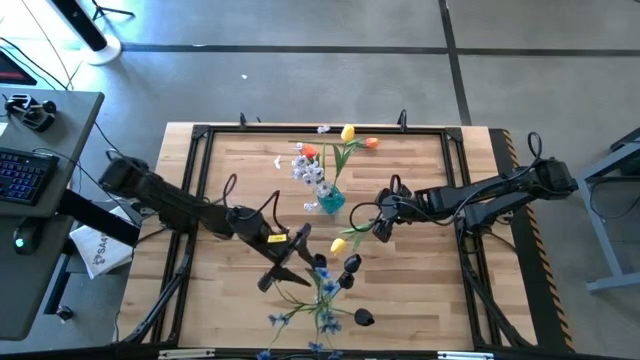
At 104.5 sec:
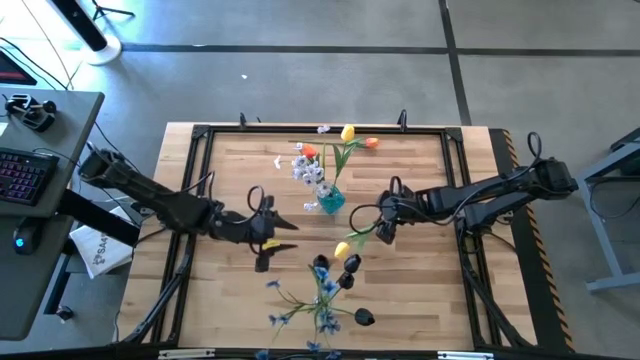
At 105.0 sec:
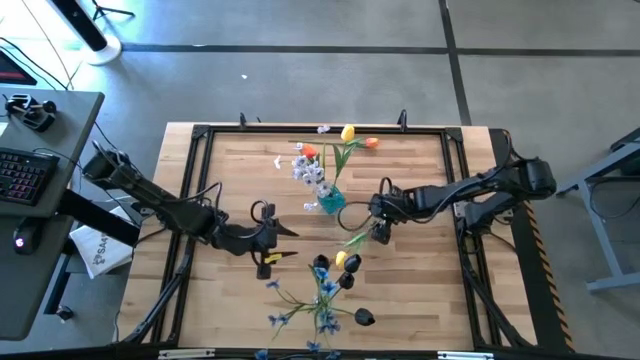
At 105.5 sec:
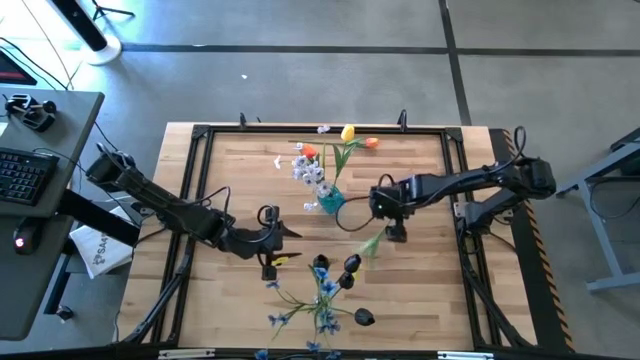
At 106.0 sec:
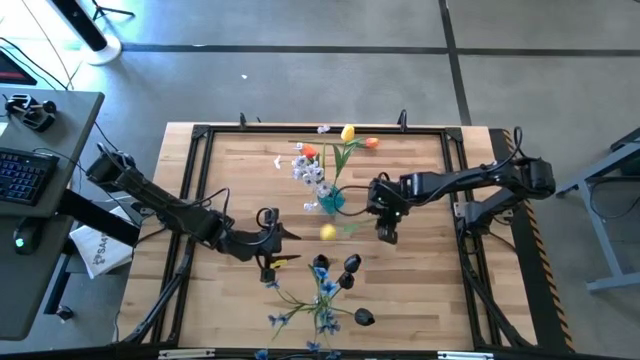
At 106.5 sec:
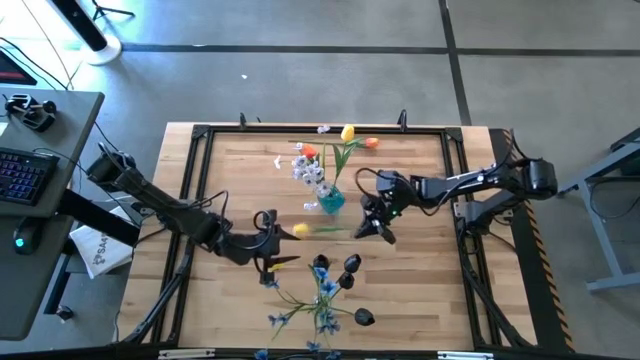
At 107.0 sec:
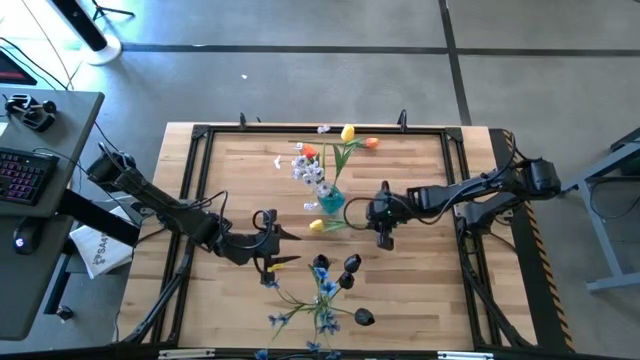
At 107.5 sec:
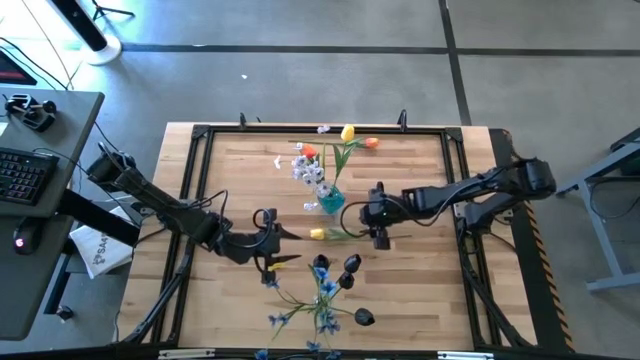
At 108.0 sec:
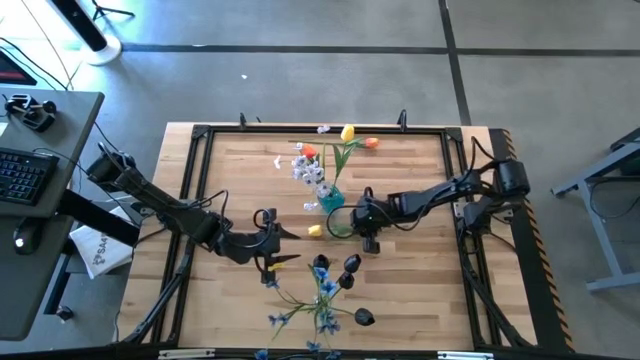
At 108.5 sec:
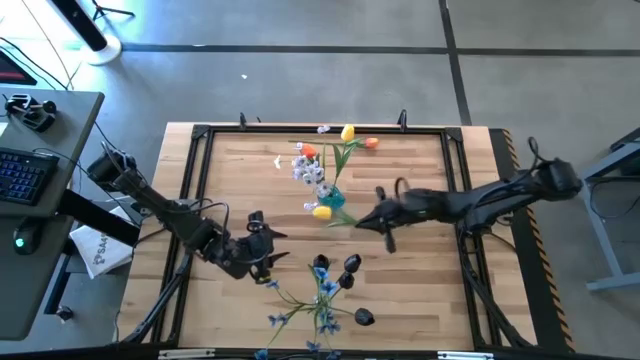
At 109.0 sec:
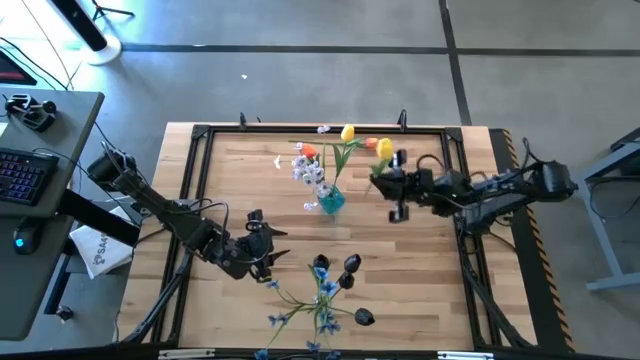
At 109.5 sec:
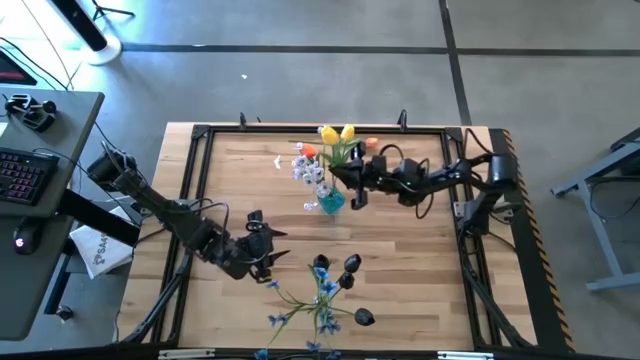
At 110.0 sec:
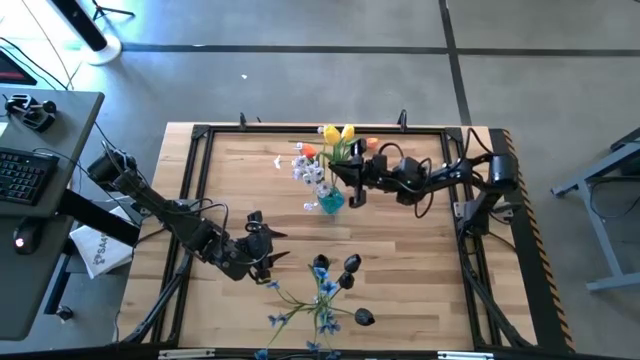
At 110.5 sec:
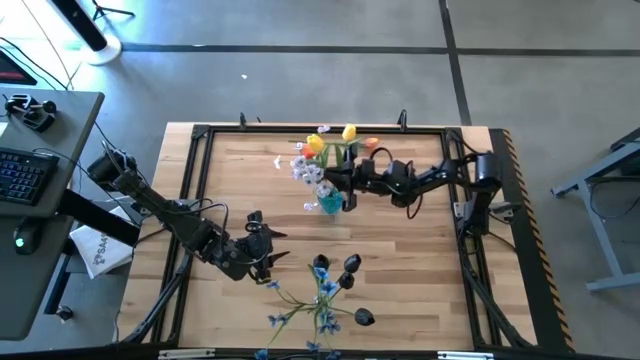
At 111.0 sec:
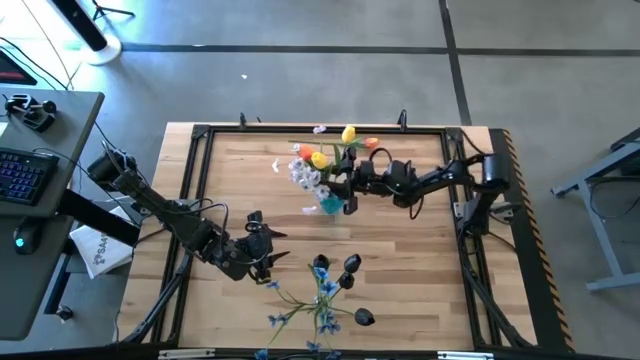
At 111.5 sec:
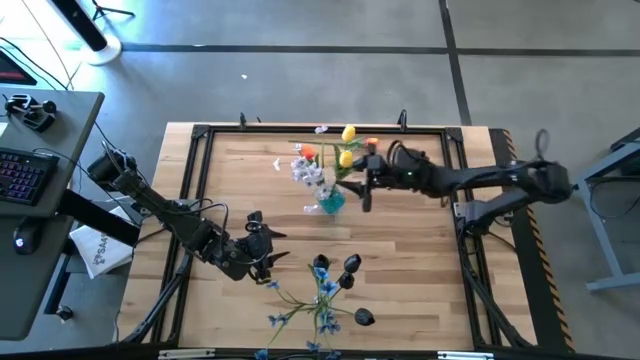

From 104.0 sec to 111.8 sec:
Task: Sort flowers into vase by color
Put the yellow tulip into the blue vase

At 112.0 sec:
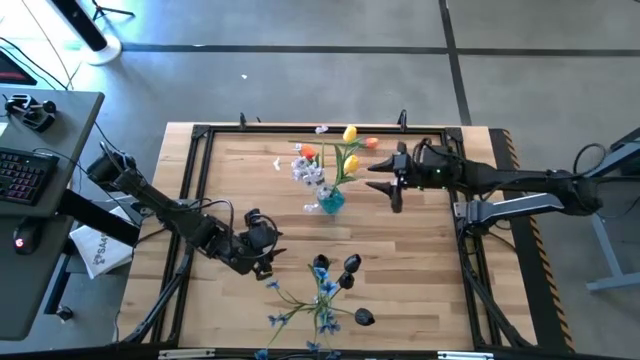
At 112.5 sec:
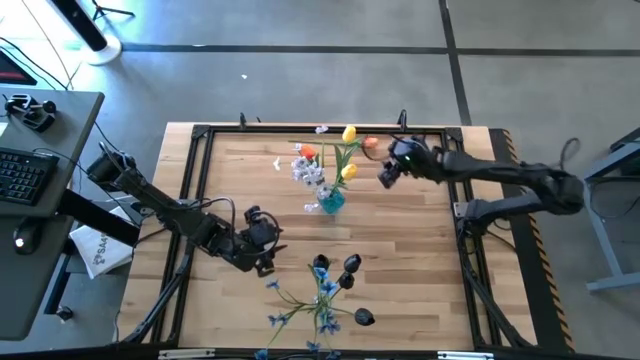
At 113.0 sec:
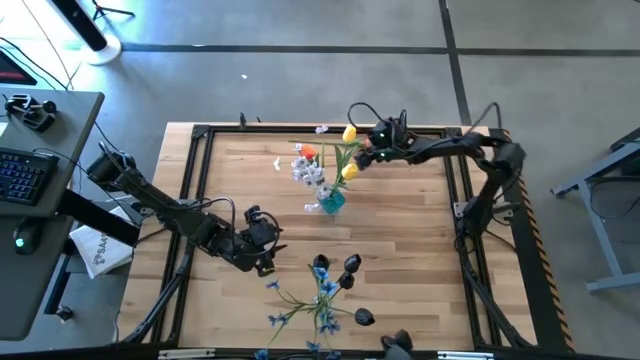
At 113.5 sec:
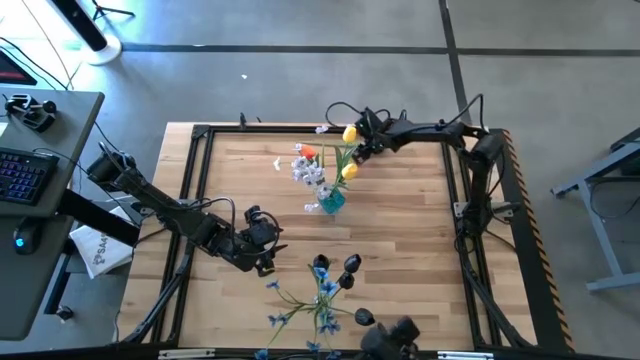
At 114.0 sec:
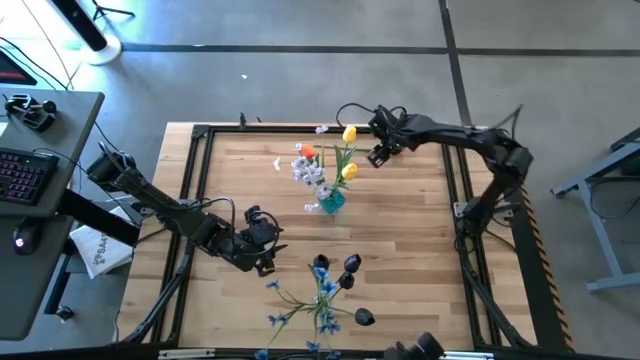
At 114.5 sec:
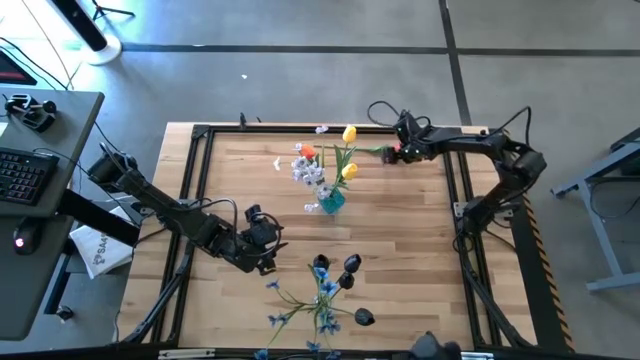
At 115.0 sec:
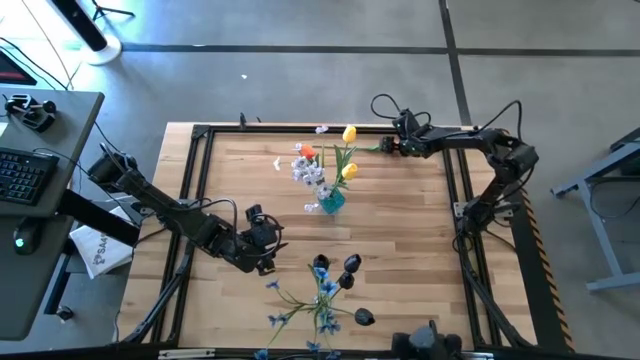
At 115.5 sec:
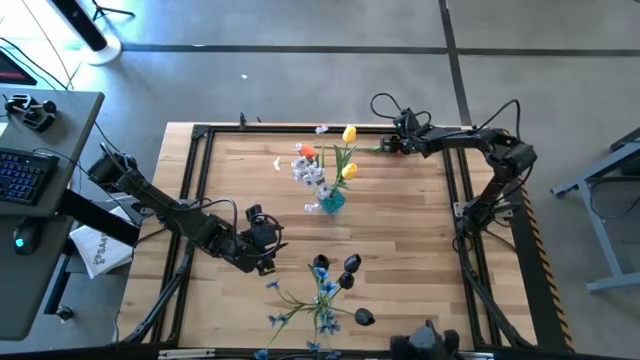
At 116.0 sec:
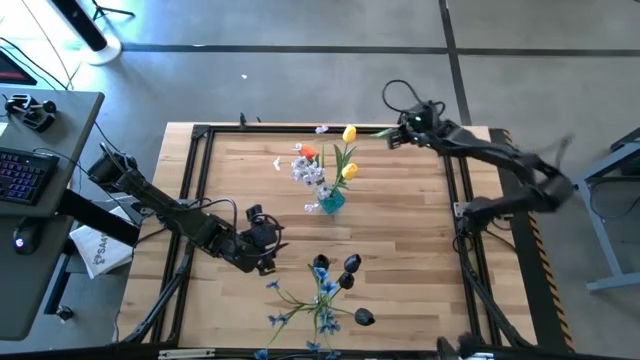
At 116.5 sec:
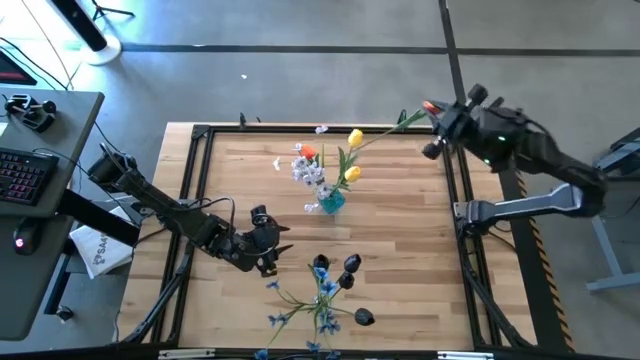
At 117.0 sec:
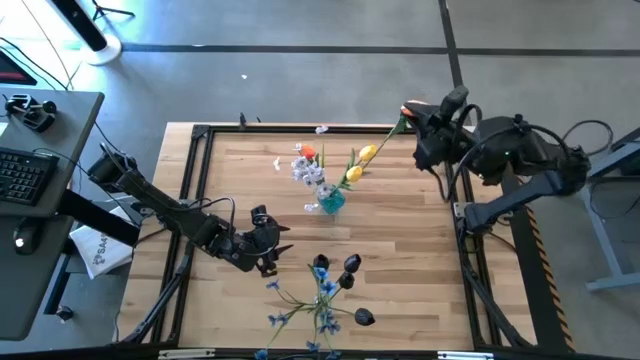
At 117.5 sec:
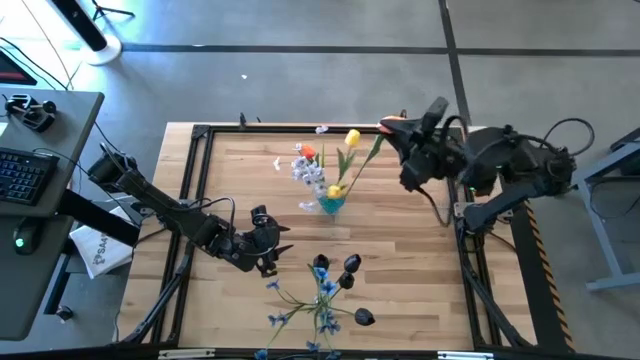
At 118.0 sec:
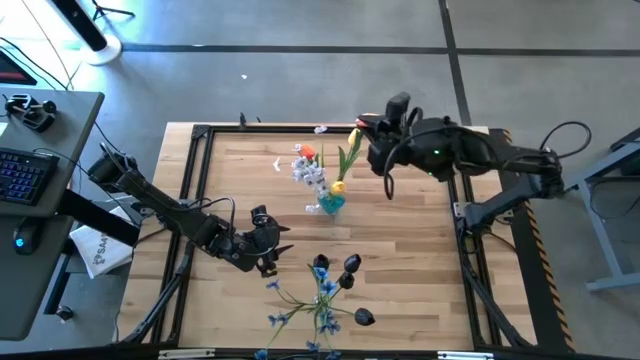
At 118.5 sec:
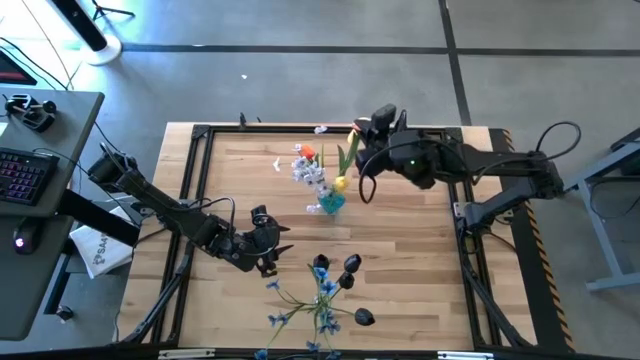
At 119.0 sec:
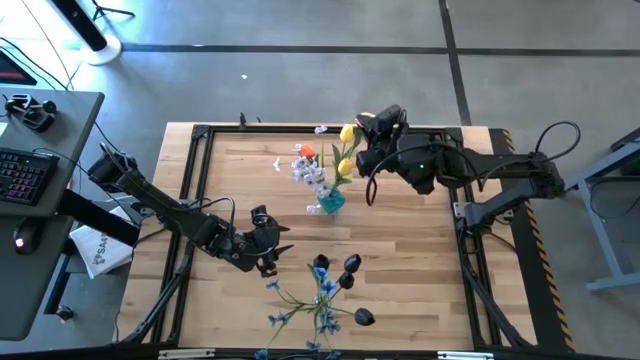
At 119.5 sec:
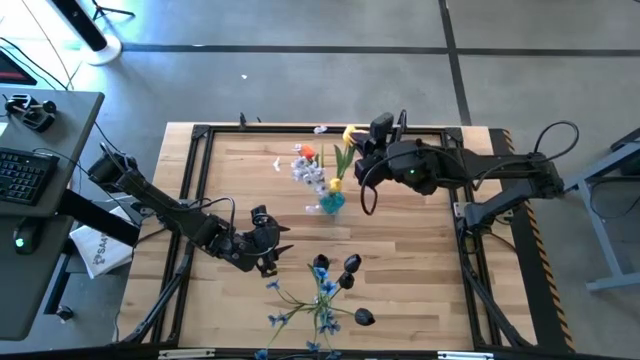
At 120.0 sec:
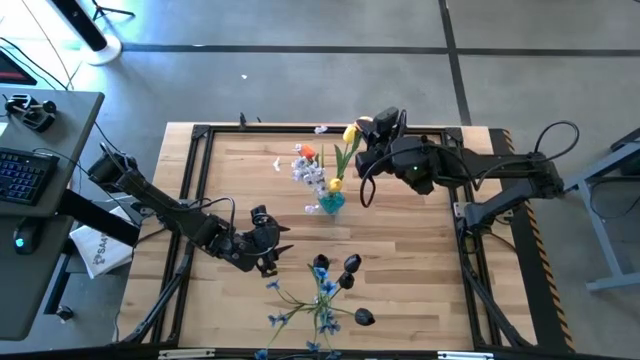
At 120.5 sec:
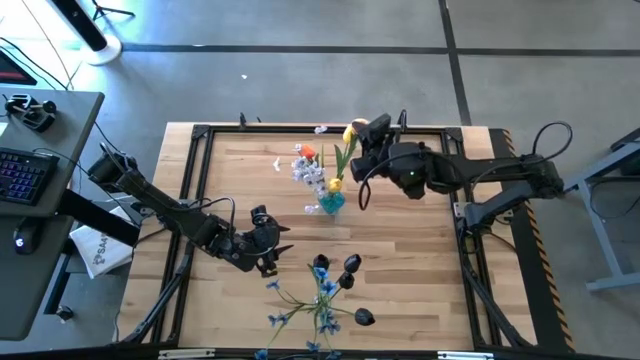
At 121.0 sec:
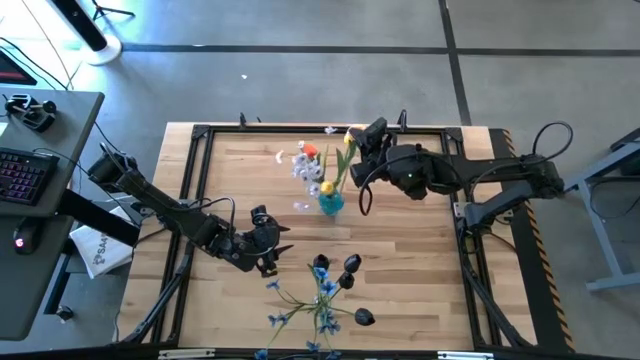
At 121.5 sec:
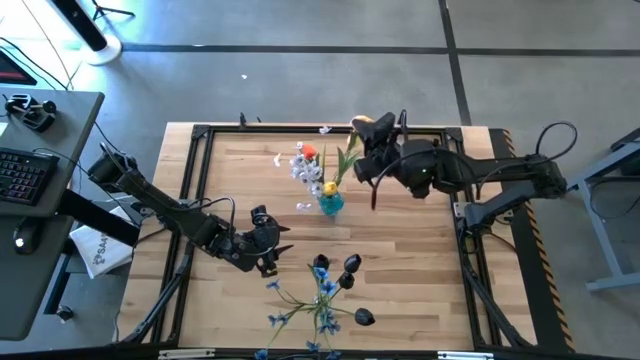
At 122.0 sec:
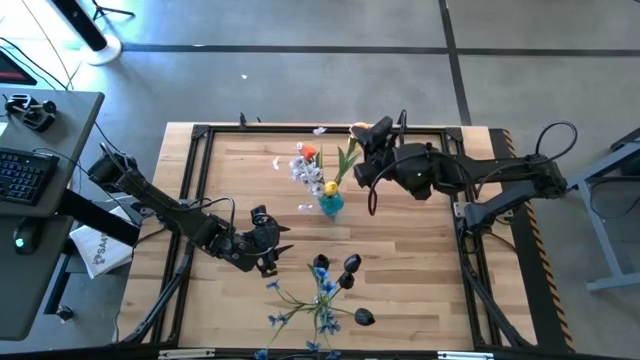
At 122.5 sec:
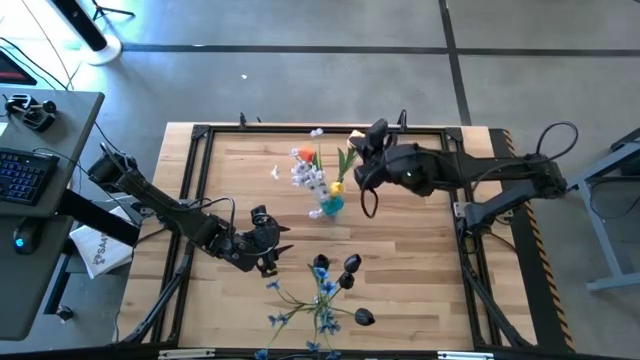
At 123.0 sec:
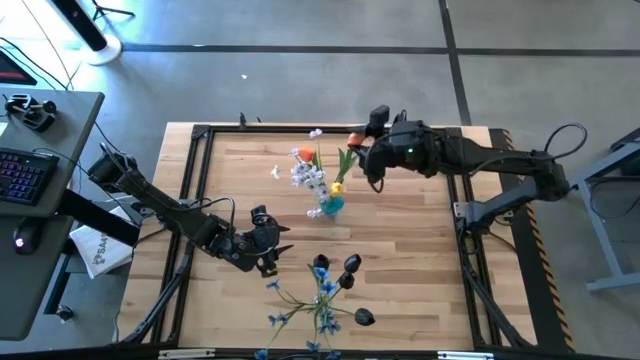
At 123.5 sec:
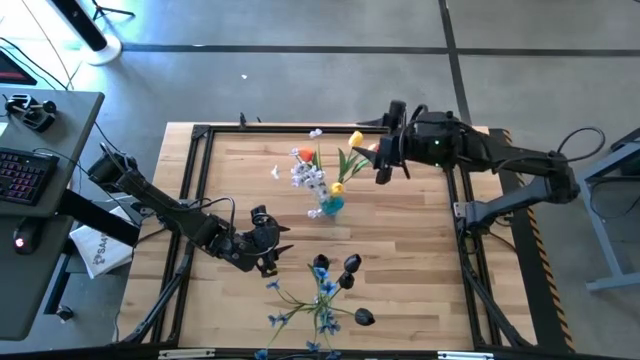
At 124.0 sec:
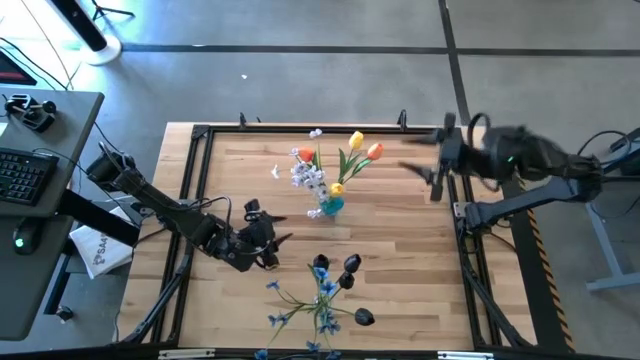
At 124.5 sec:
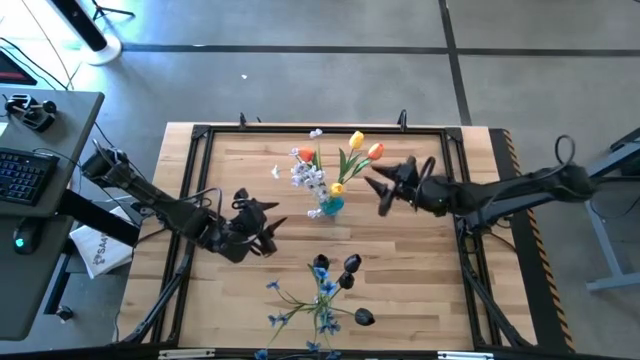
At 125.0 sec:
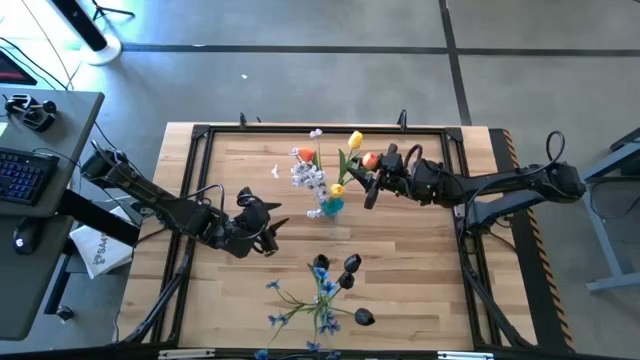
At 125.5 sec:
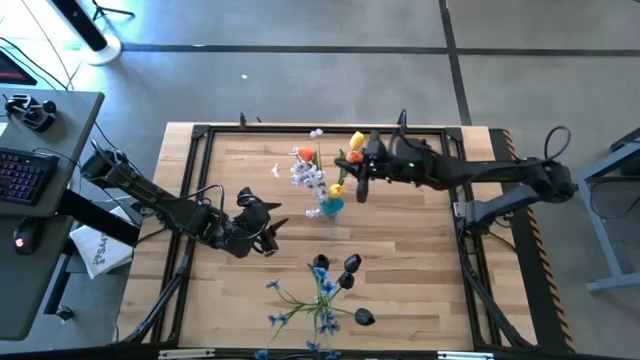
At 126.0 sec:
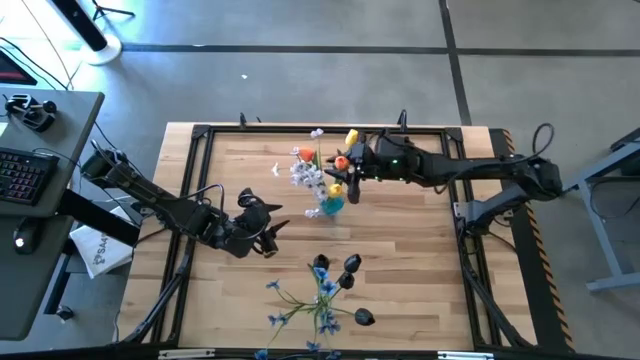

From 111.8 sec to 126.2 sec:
Put the orange tulip into the blue vase
